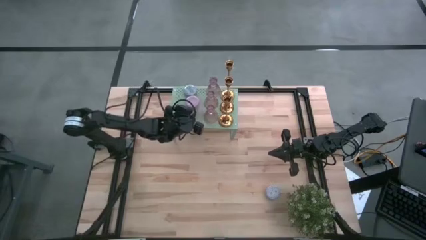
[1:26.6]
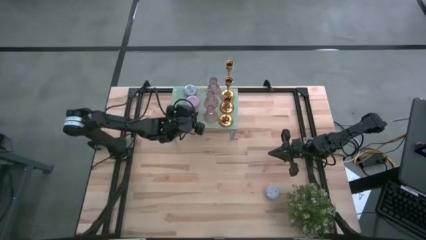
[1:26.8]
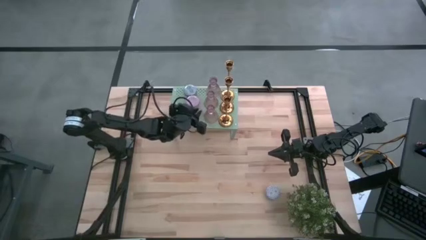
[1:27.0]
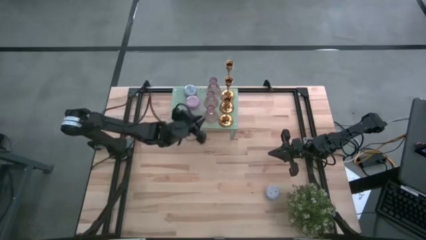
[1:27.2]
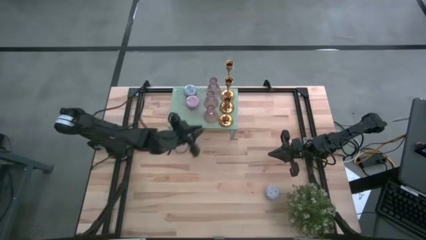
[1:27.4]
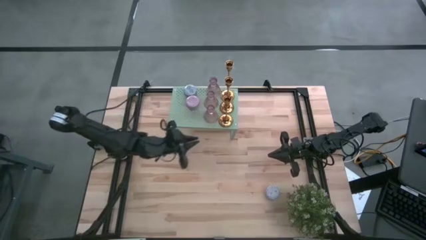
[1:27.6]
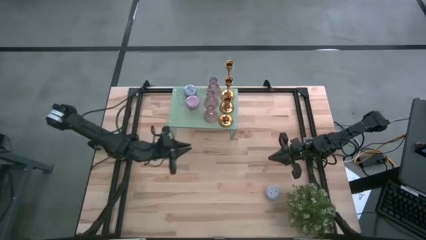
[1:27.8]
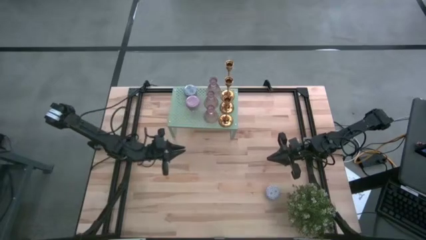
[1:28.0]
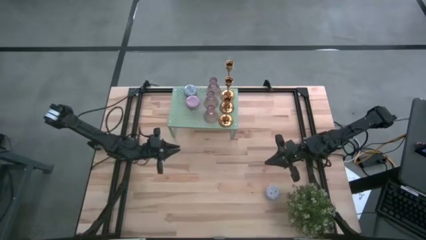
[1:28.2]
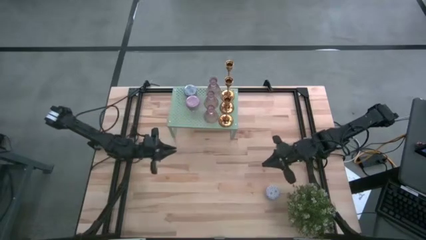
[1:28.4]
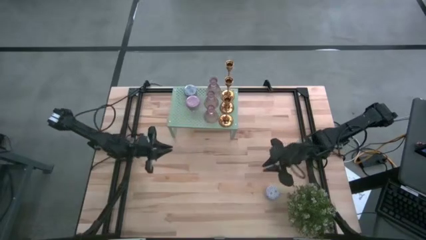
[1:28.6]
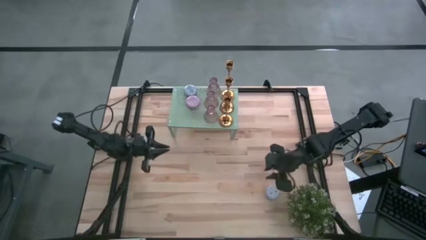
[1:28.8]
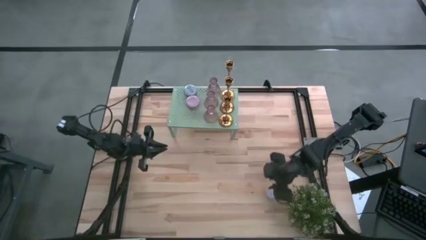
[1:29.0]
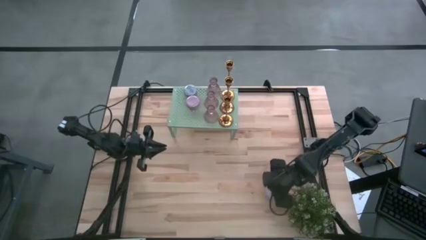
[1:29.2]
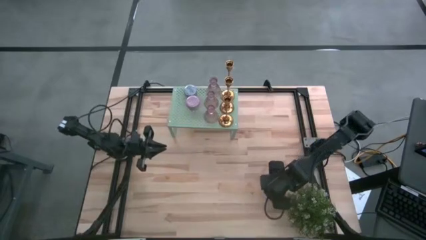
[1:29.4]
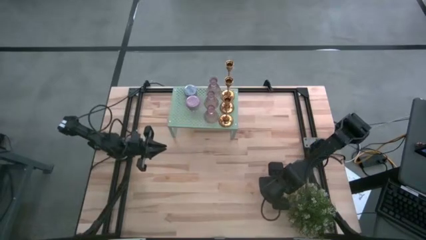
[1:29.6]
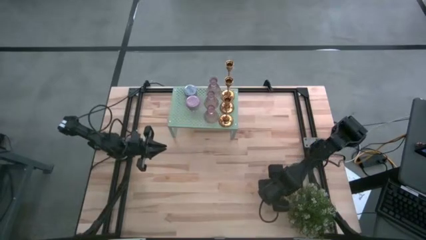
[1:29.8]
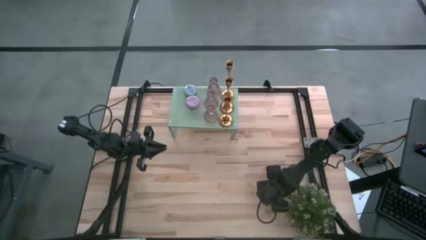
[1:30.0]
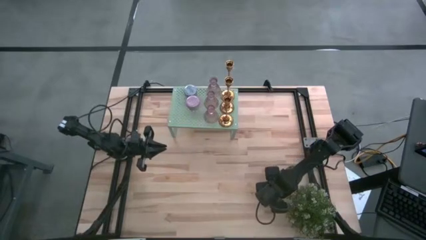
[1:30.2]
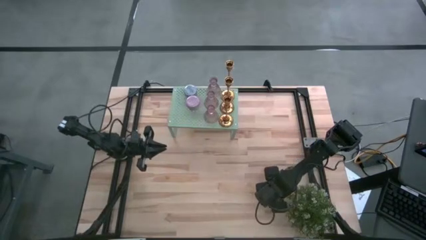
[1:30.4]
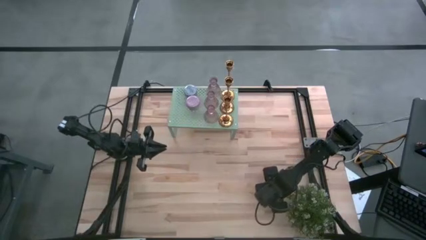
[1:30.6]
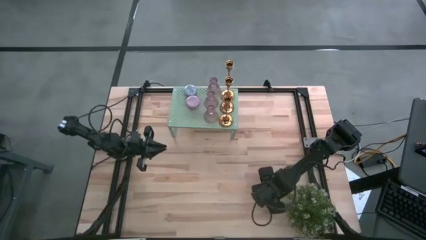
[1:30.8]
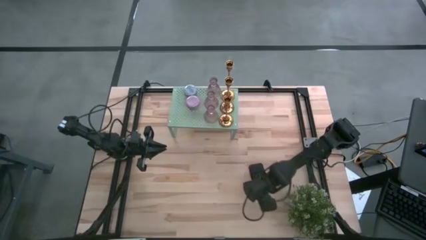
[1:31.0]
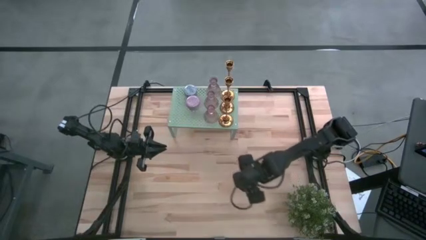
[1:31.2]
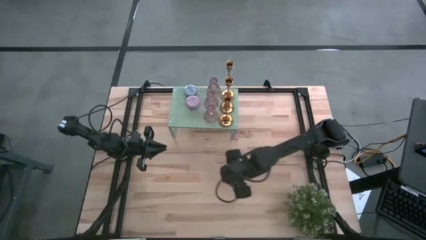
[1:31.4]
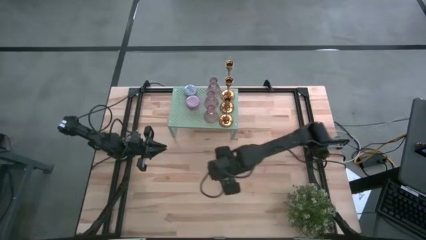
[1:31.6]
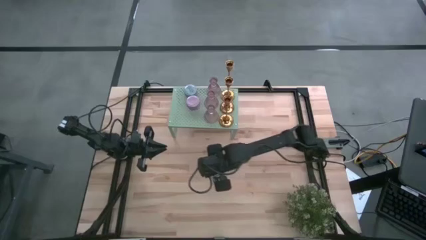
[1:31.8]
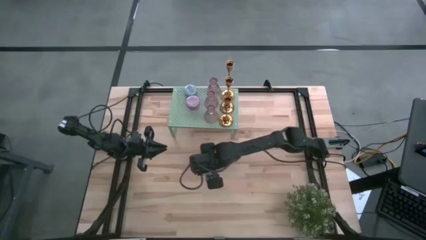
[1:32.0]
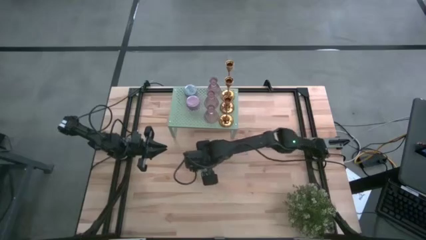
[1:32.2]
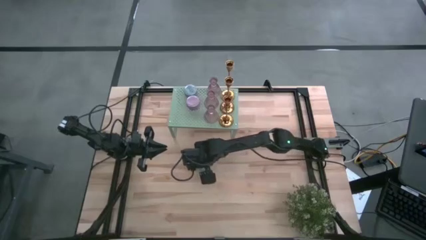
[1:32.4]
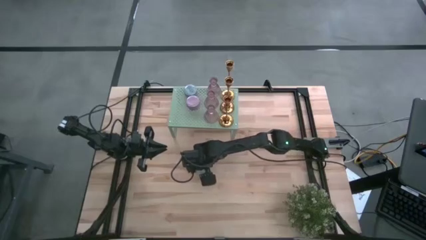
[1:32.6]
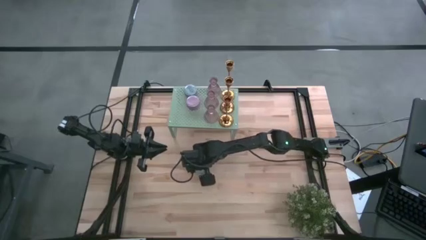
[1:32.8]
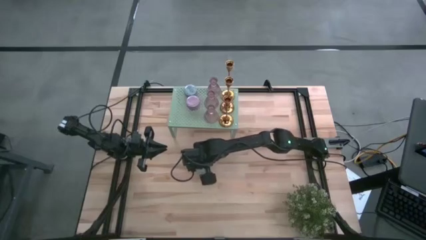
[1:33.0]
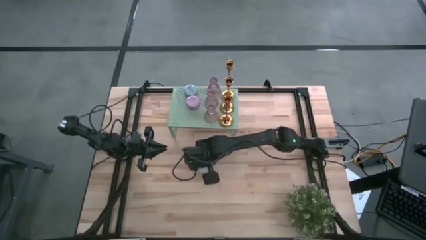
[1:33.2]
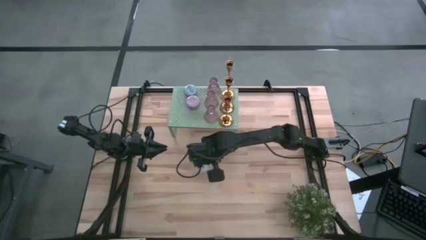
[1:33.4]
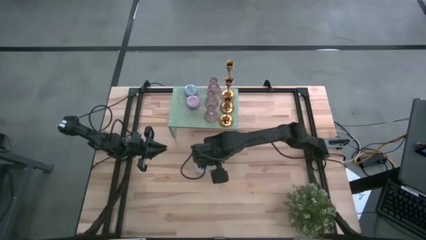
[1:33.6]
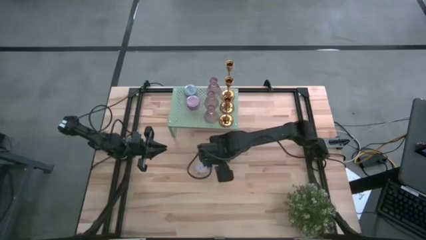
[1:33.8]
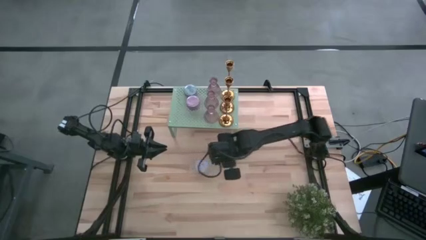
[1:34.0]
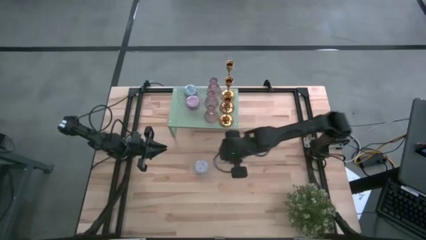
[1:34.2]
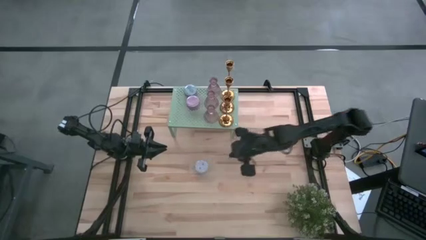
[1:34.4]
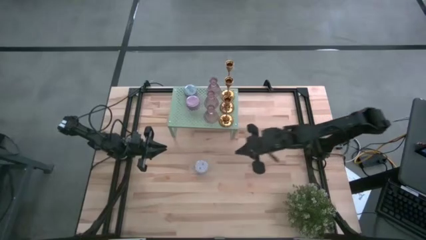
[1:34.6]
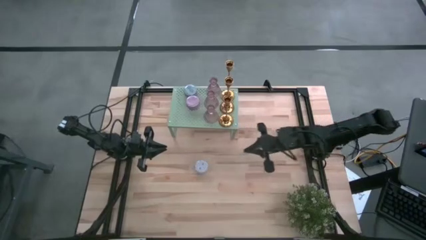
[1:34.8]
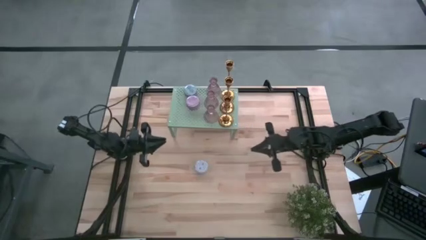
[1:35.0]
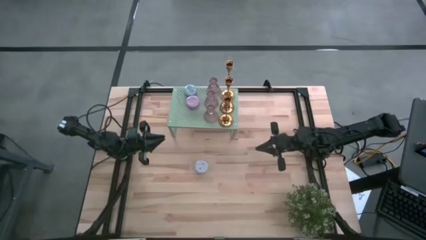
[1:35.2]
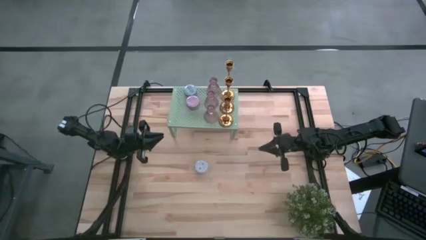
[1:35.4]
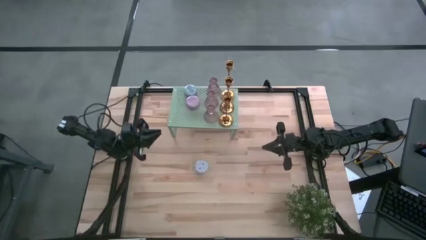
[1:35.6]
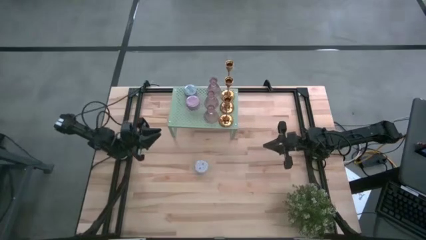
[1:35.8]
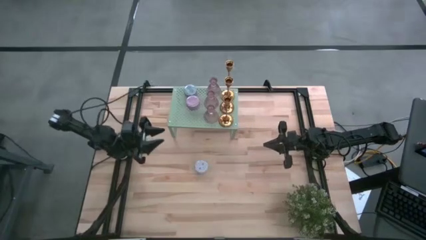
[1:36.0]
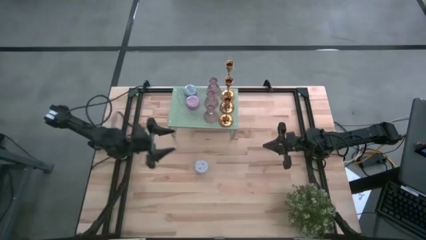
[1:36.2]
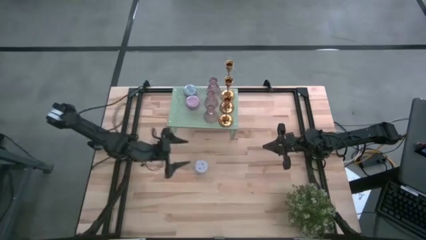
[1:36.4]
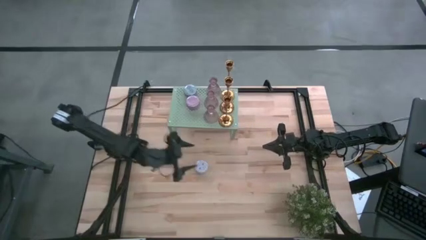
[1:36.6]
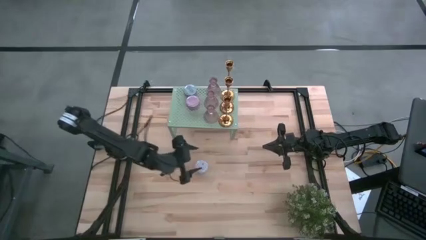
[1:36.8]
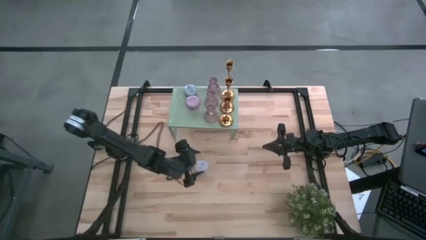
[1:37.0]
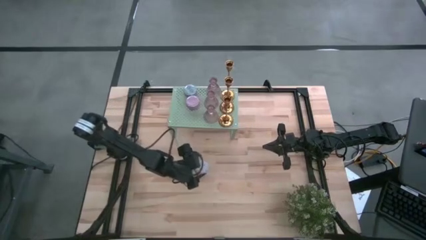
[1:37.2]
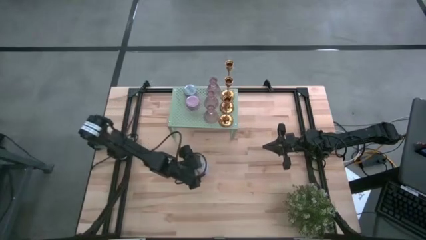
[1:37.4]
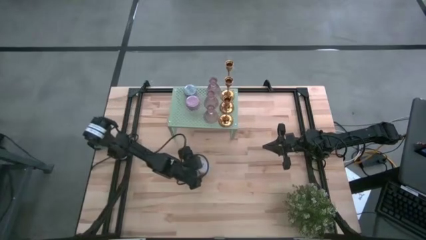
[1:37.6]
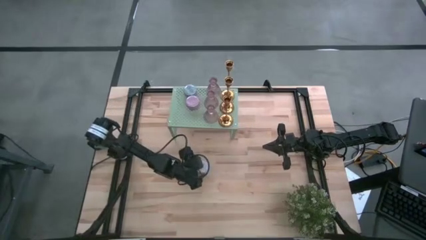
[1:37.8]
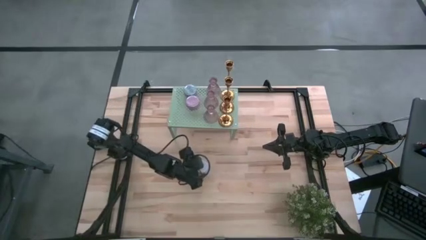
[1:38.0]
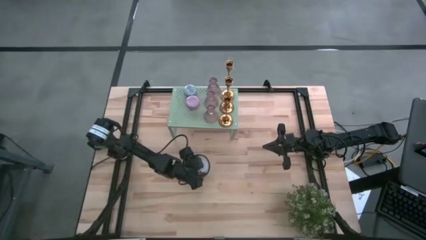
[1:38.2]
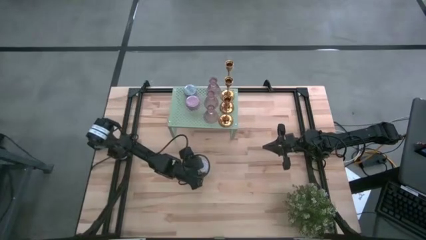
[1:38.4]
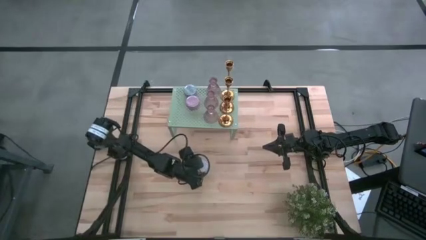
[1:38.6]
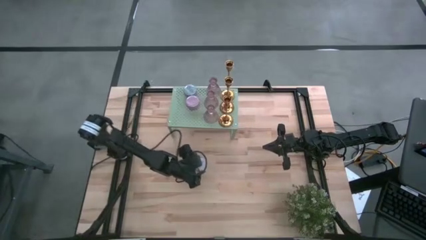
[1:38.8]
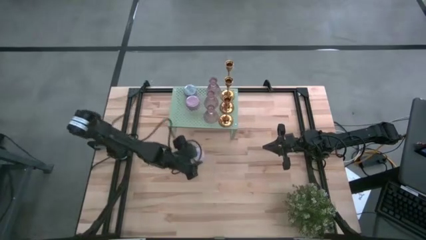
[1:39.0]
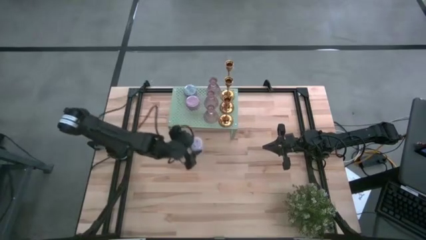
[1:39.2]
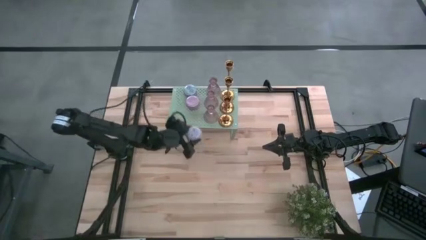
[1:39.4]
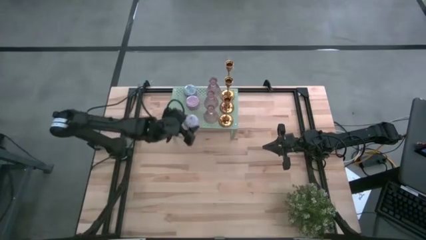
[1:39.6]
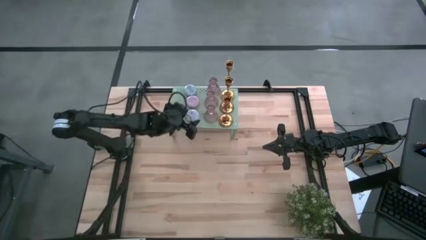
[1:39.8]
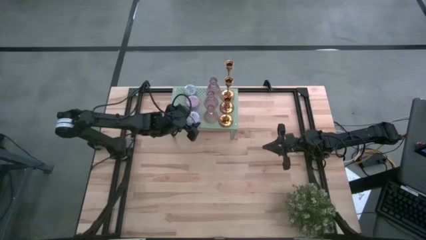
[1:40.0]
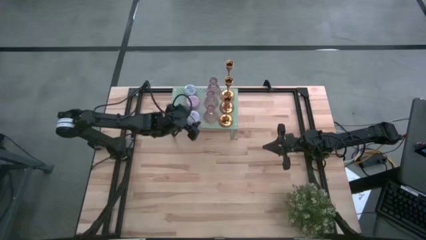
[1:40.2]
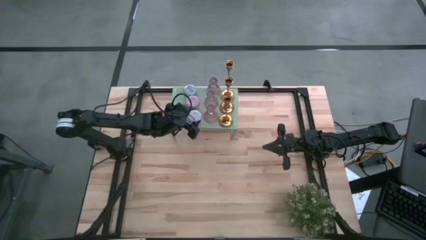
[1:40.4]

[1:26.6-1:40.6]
Task: Pick & Place candle stick holders
Put the white scented candle on the shelf aligned with the scented candles

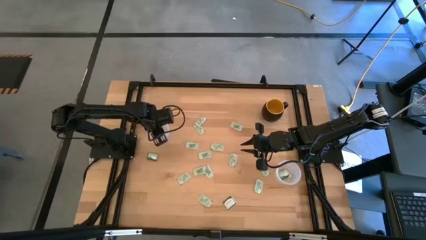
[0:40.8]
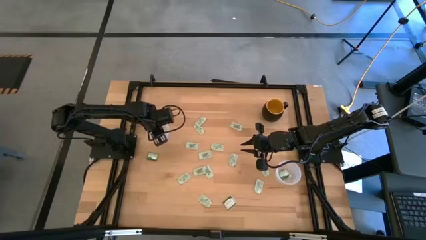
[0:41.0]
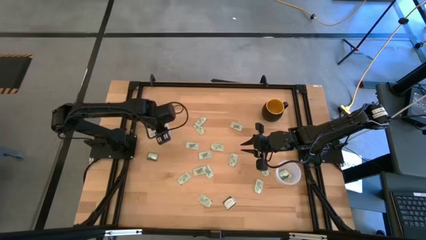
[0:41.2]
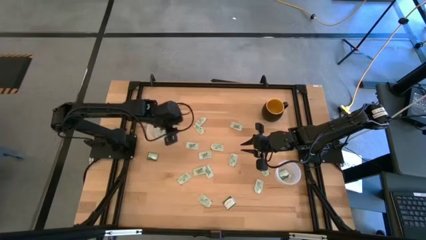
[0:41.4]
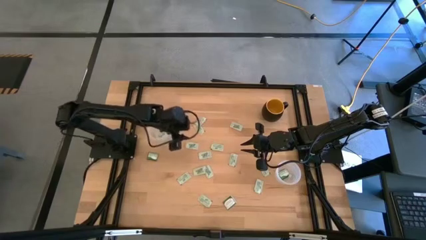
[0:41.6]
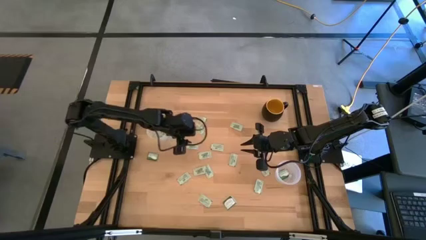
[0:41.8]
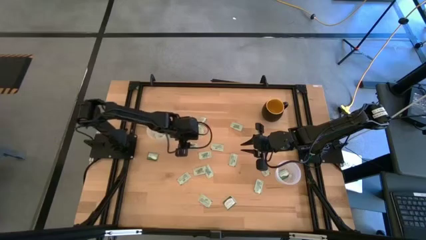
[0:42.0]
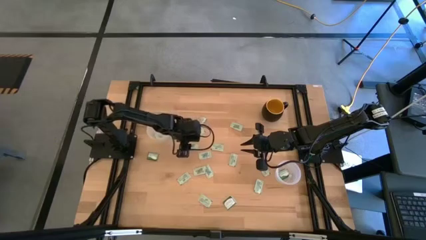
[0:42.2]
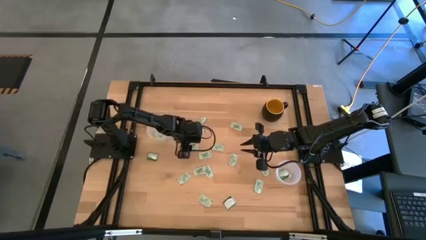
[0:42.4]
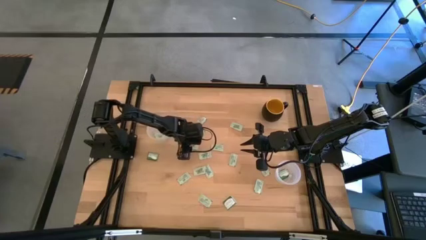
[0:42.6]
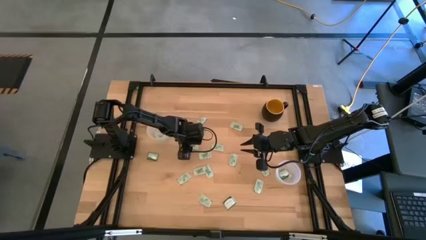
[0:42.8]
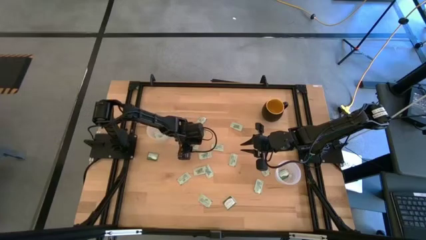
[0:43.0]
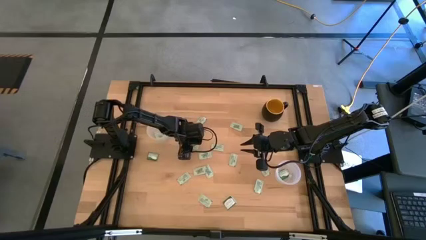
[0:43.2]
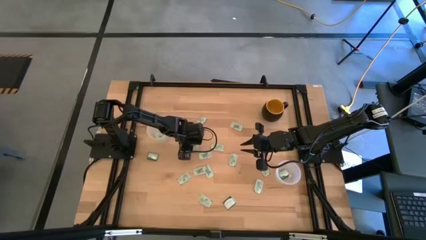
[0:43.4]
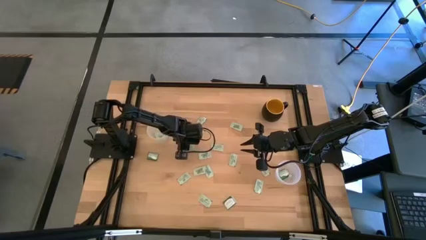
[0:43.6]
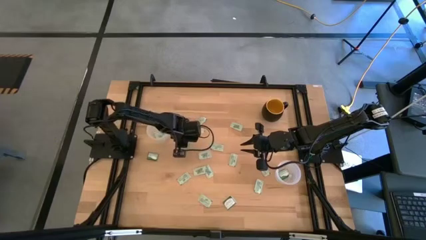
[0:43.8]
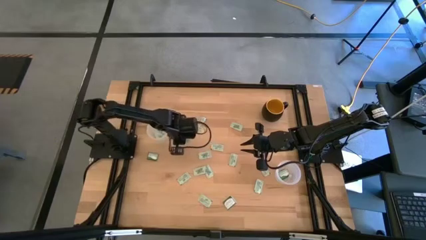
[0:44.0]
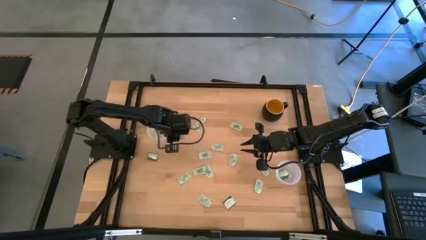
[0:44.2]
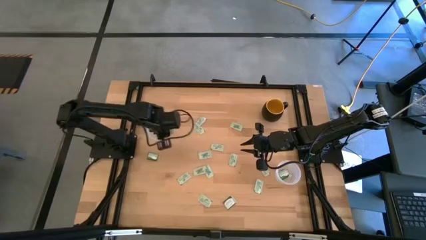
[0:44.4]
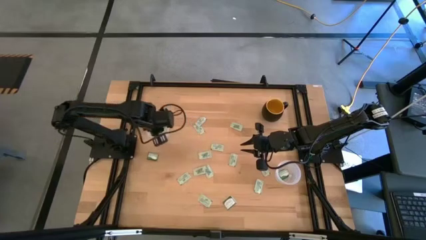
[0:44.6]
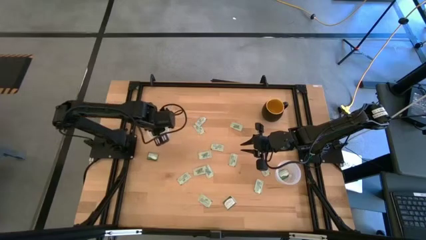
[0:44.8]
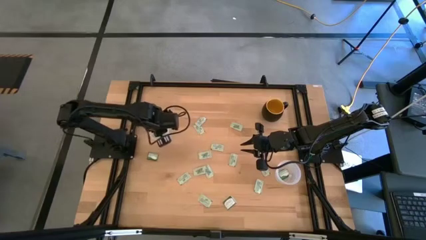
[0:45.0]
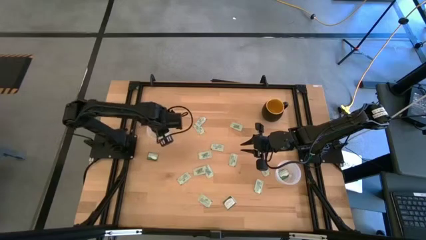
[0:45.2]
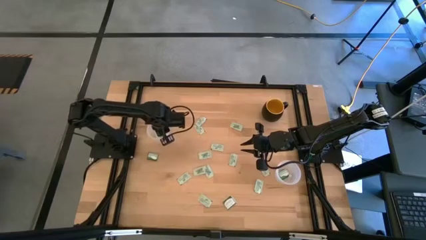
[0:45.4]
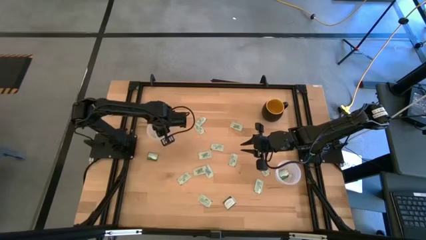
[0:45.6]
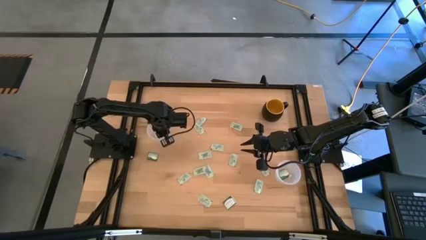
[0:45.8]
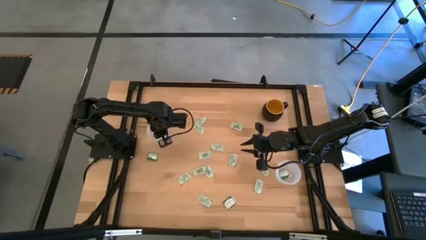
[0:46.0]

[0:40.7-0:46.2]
Task: Pick and place Stevia / Truvia into bins
Put the white stevia packet into the left transparent container
